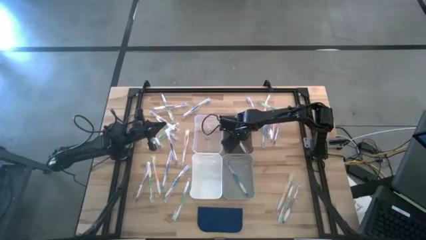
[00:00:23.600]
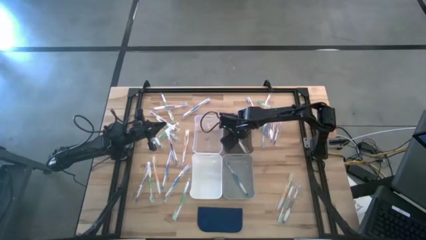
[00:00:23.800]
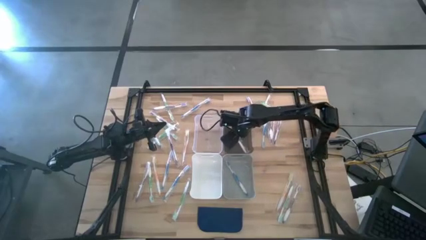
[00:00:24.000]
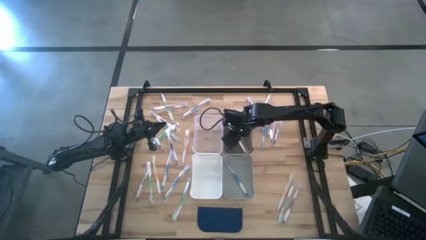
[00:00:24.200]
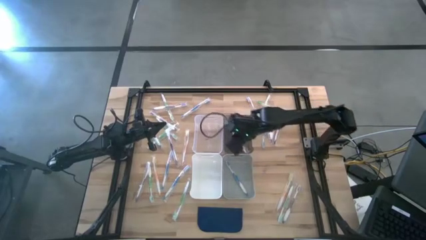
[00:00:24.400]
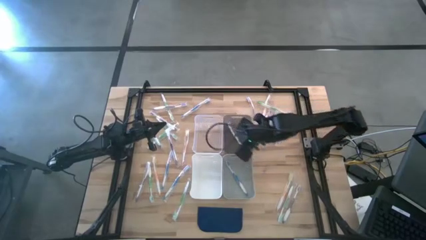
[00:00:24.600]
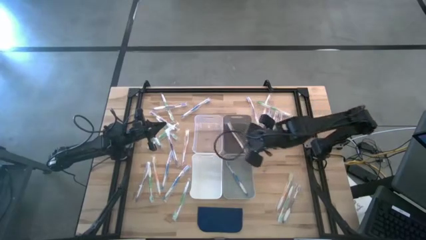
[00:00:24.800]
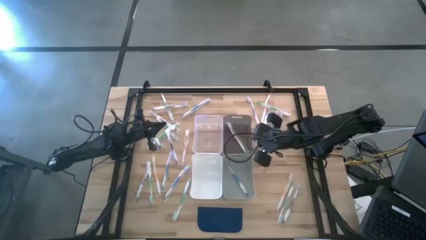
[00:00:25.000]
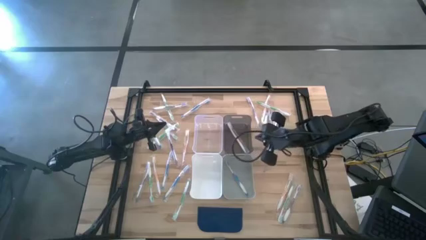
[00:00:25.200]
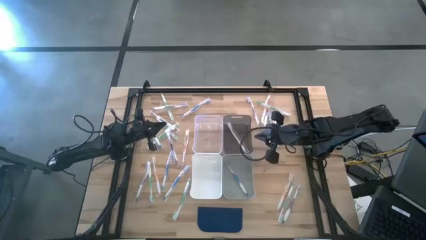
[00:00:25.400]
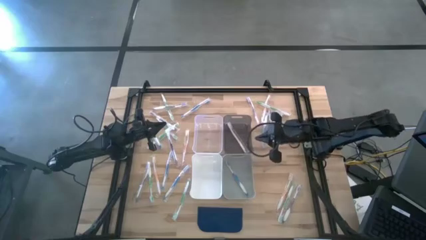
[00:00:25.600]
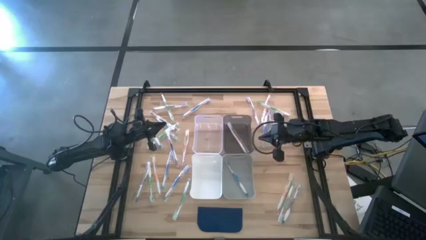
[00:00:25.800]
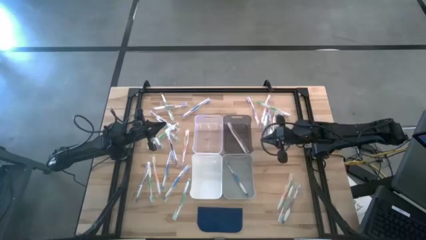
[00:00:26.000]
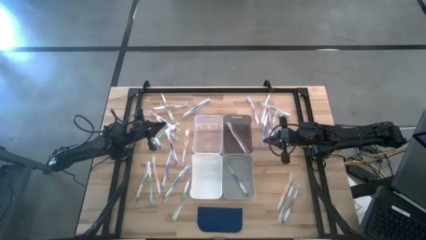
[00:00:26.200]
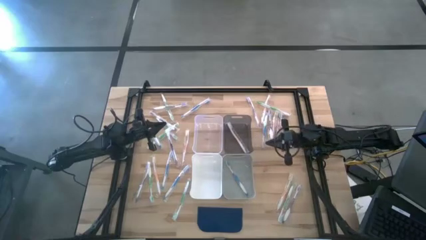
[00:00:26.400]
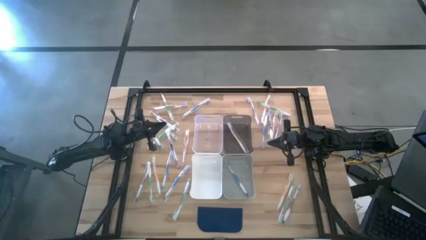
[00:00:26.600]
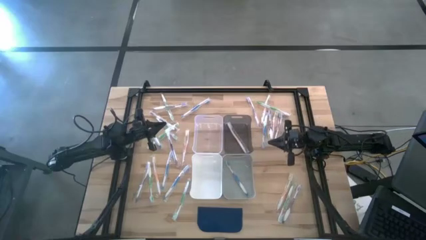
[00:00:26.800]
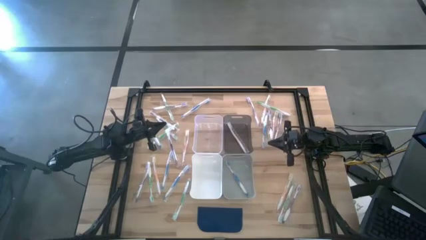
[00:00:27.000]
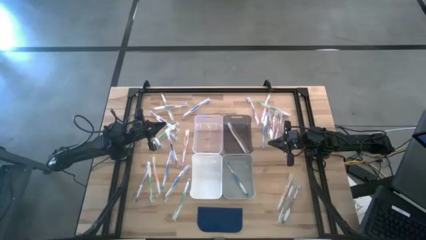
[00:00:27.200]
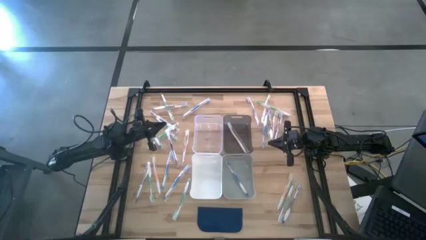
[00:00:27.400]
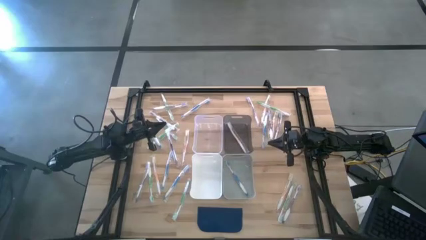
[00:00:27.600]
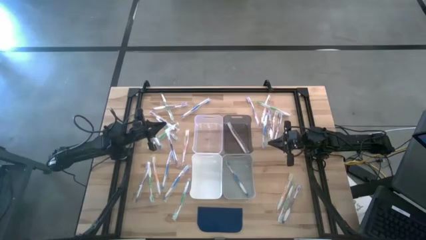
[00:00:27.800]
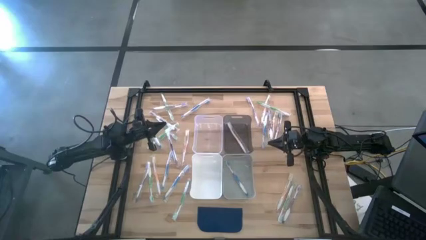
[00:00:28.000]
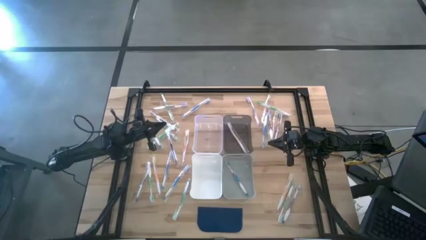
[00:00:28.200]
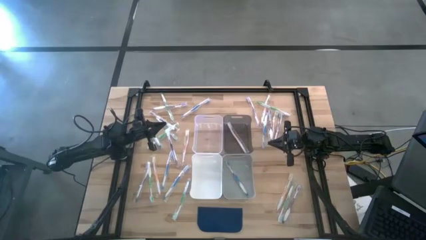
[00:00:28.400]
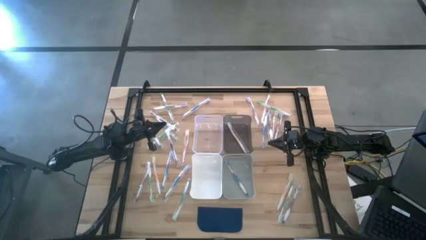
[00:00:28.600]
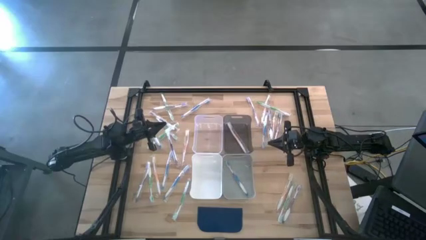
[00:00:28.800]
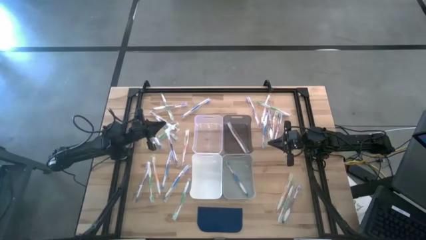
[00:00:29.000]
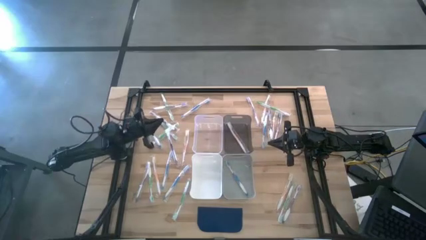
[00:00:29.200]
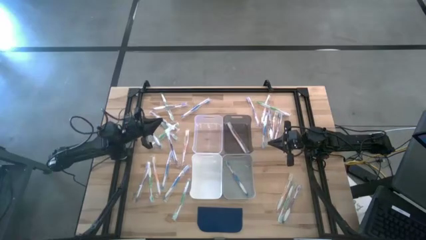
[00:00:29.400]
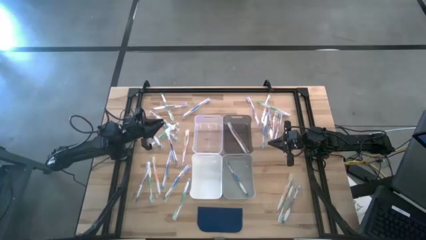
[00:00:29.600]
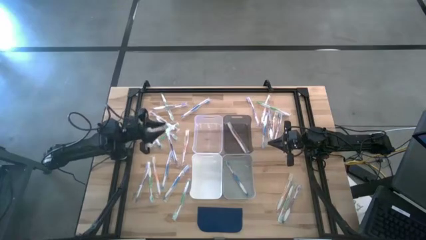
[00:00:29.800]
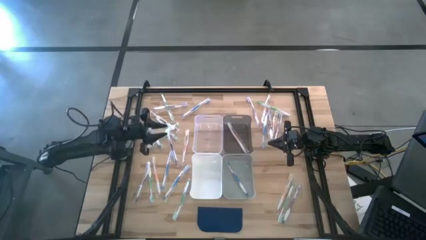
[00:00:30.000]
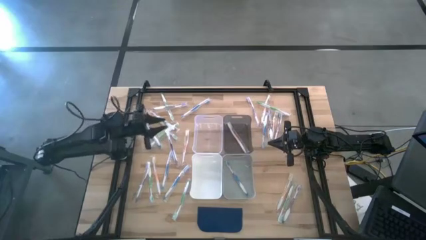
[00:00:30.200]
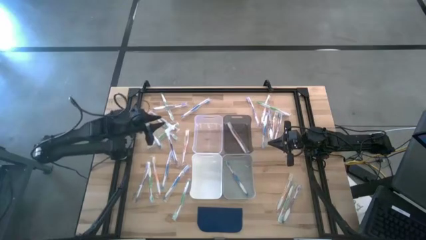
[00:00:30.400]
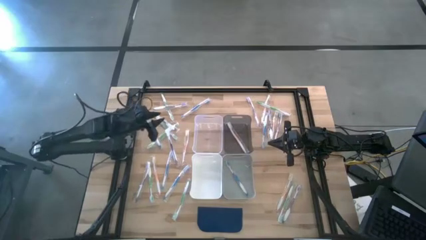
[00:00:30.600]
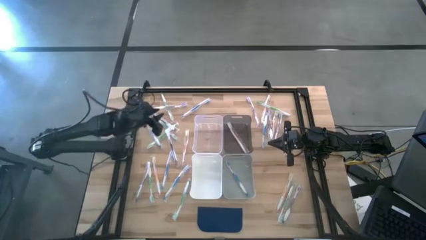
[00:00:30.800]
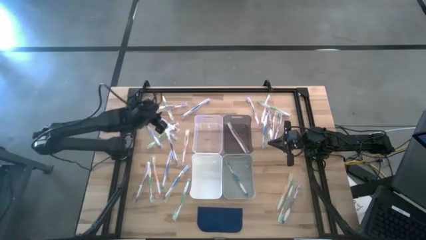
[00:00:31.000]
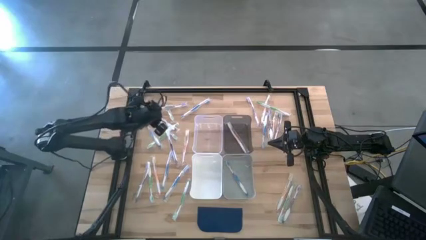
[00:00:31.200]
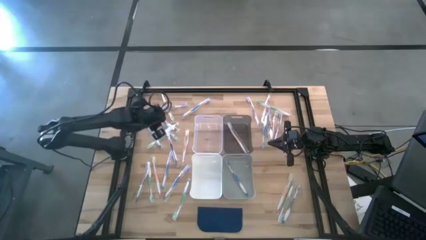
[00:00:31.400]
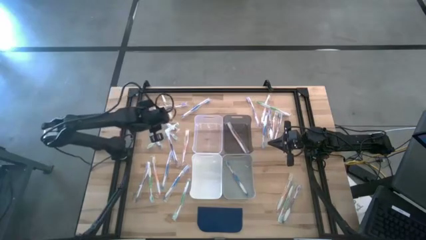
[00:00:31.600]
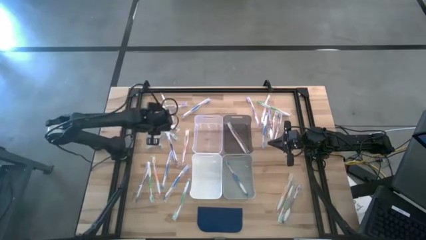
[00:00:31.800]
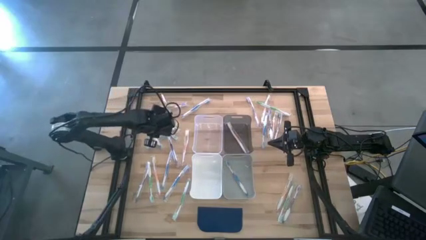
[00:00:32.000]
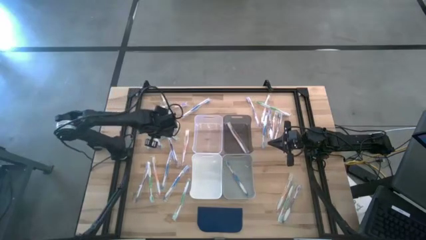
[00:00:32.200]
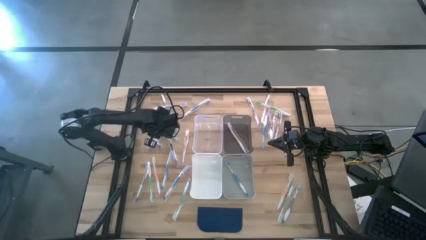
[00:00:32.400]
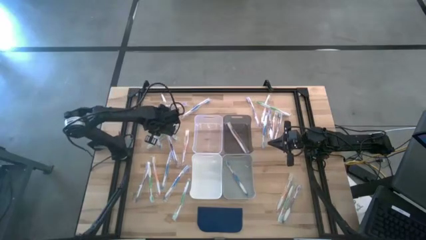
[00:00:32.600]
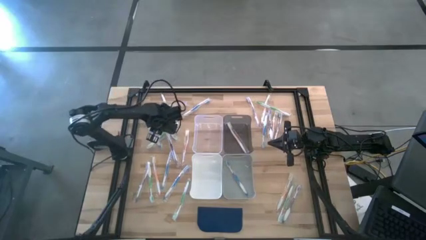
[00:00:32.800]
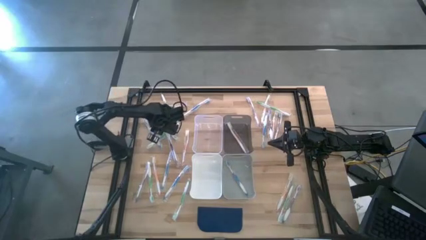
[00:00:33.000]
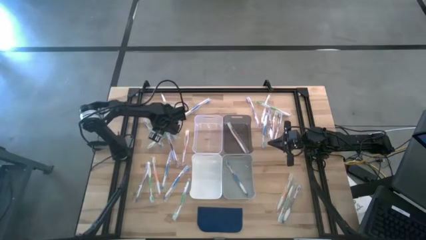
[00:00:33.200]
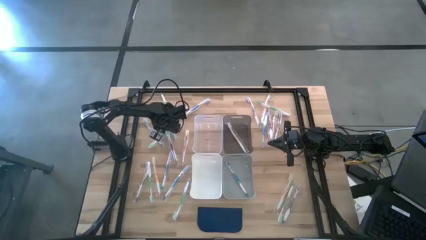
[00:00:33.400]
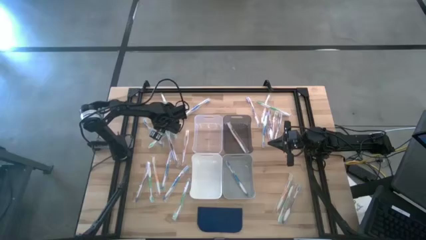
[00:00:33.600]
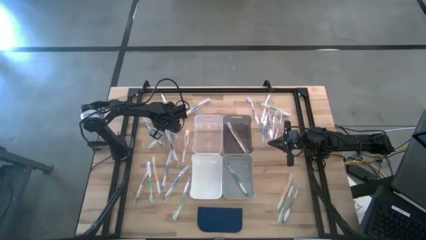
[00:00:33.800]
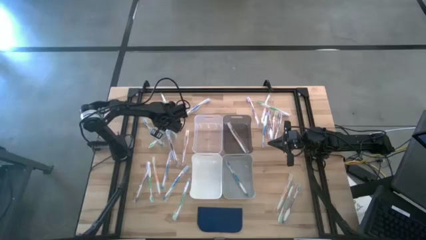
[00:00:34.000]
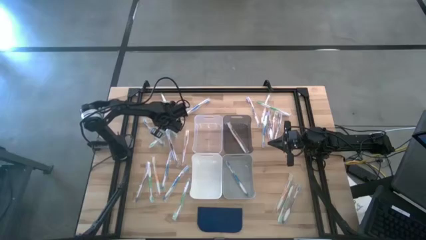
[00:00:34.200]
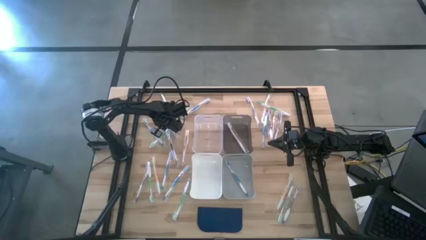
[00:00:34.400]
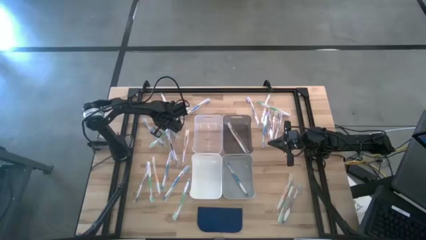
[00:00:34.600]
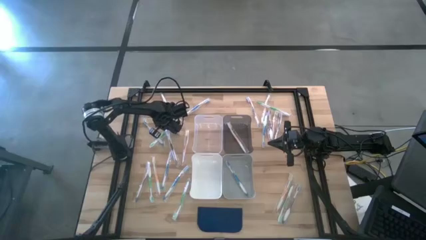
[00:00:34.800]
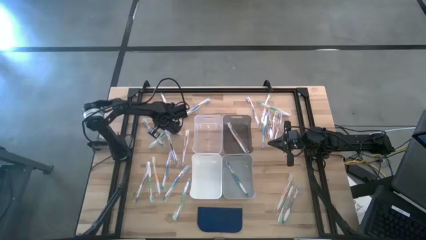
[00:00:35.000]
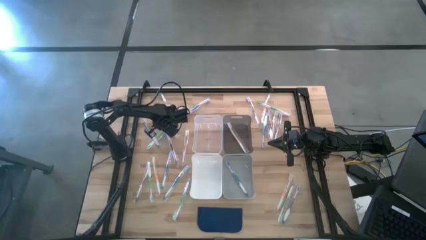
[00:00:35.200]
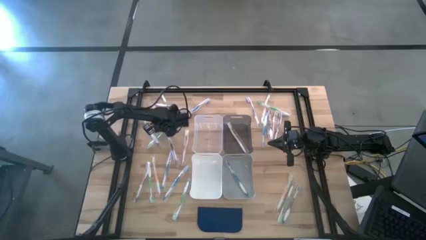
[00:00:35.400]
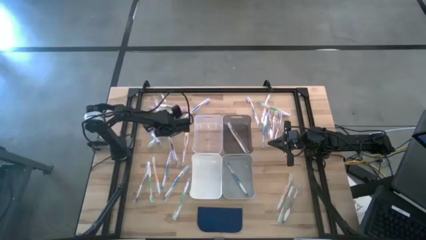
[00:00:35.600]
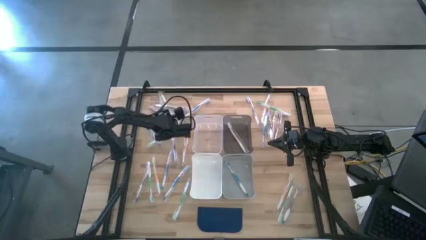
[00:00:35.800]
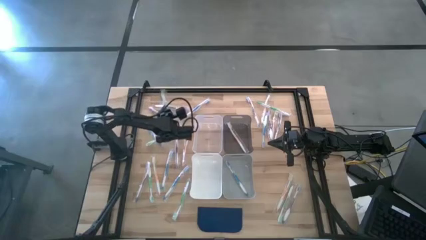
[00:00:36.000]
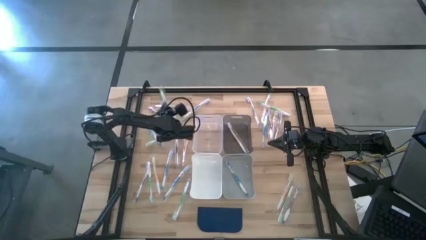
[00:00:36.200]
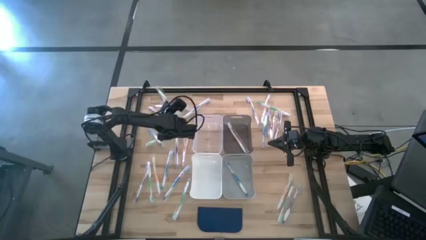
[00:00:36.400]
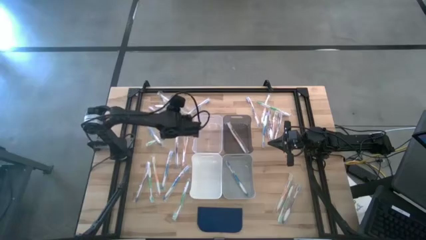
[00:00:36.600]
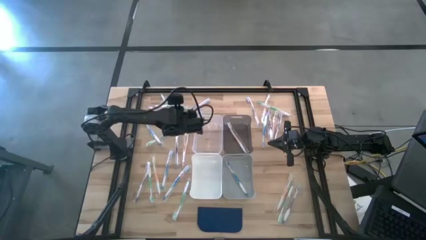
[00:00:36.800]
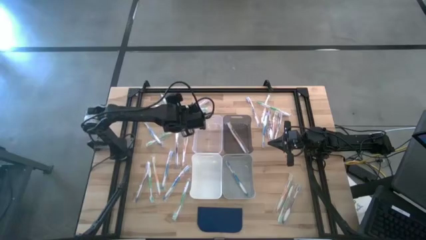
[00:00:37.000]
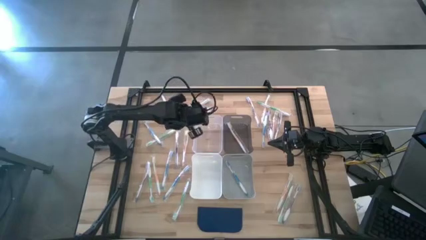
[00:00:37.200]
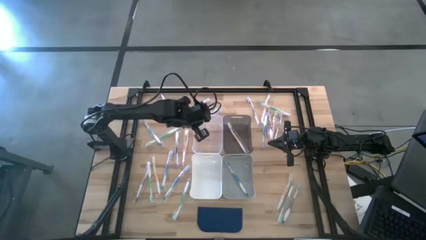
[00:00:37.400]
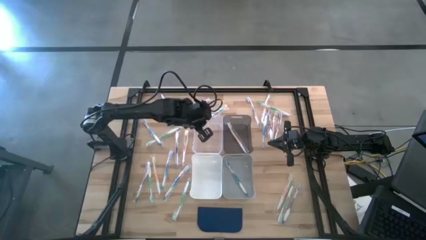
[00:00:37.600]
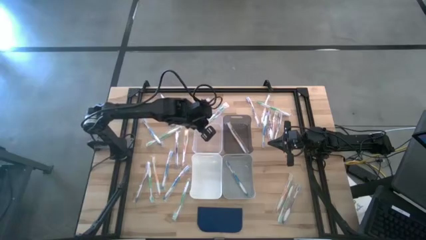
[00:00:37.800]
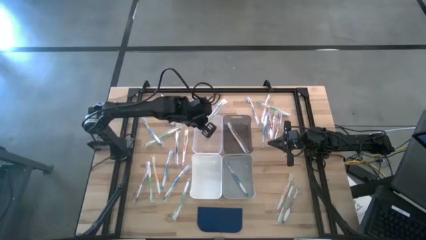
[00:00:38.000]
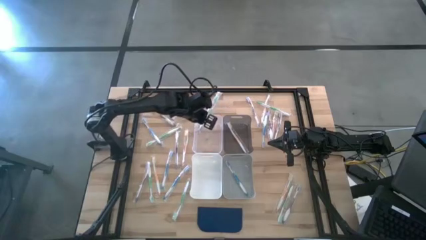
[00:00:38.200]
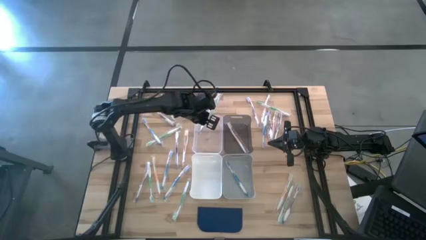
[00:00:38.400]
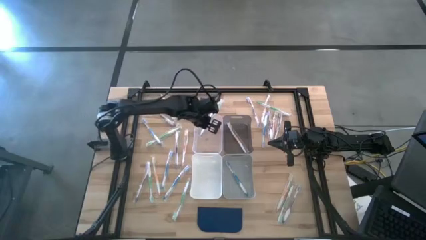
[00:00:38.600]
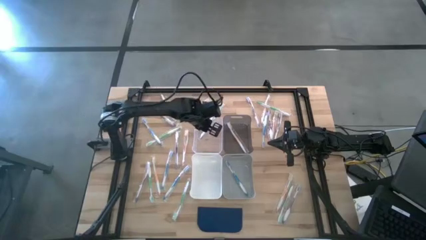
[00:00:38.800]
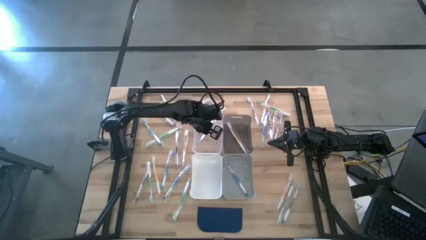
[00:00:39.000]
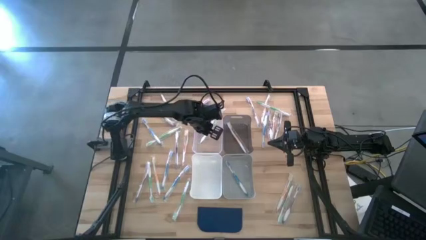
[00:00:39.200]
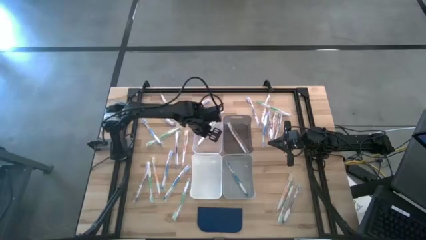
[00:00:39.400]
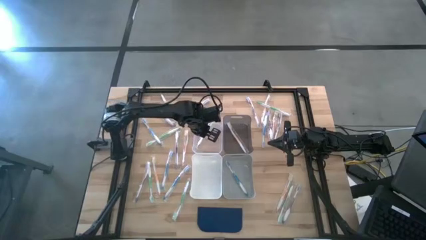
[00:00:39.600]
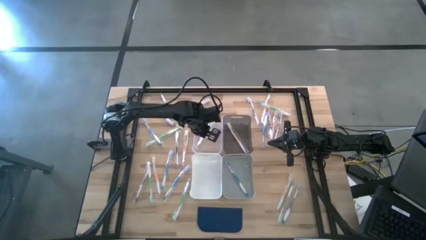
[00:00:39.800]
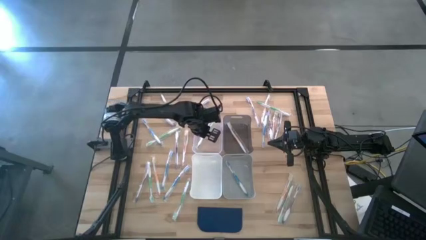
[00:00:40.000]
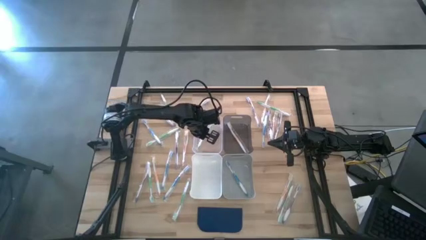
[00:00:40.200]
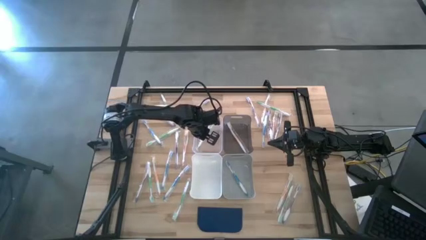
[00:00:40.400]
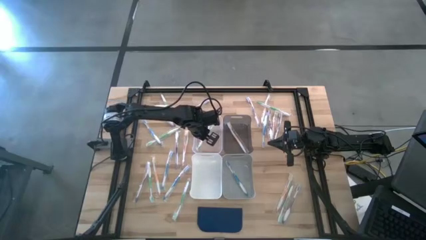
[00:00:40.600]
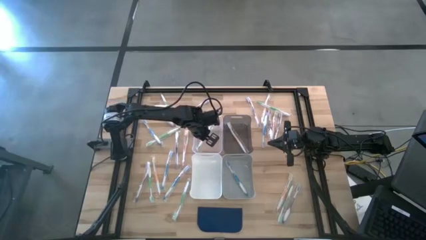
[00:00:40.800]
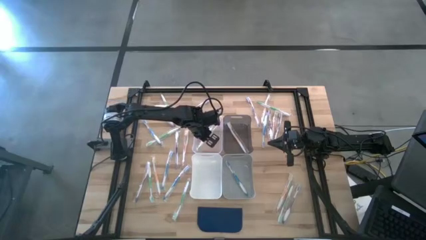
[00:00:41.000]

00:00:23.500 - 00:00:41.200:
Task: Pick & Place Toothbrushes
Put the green toothbrush into the transparent bin
